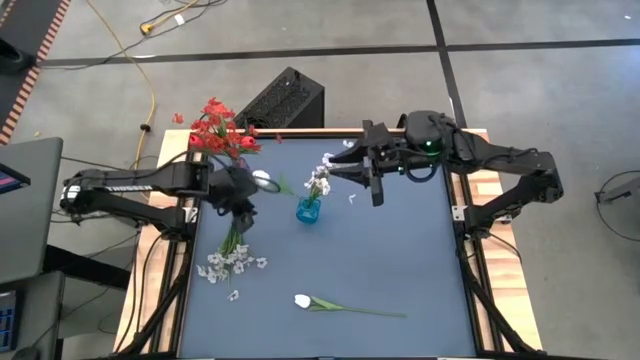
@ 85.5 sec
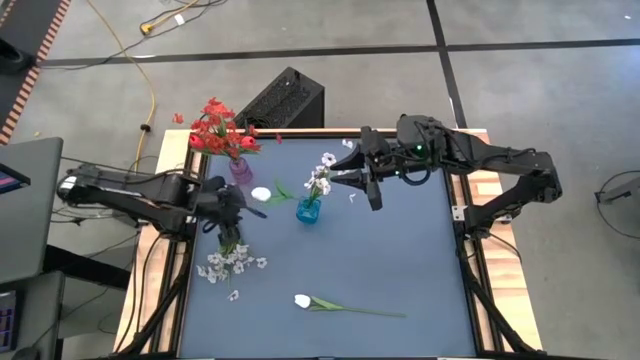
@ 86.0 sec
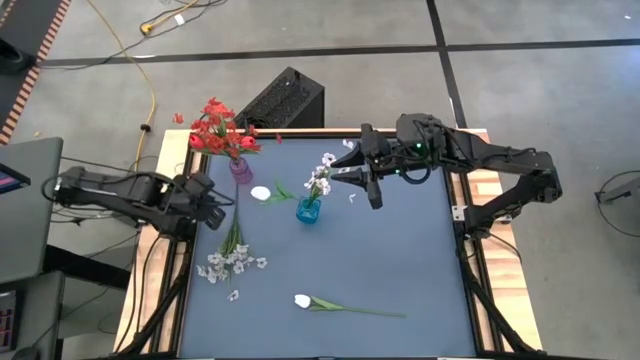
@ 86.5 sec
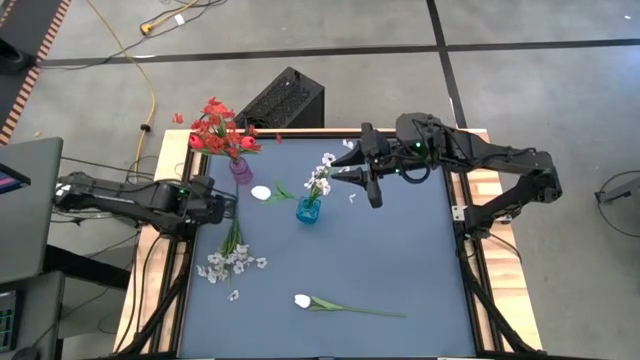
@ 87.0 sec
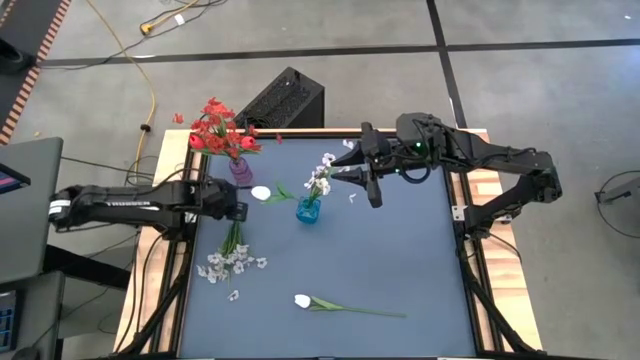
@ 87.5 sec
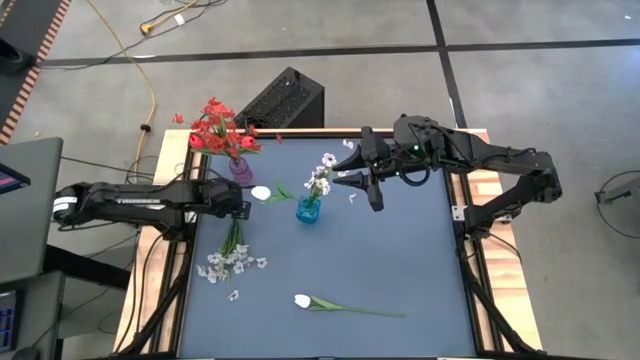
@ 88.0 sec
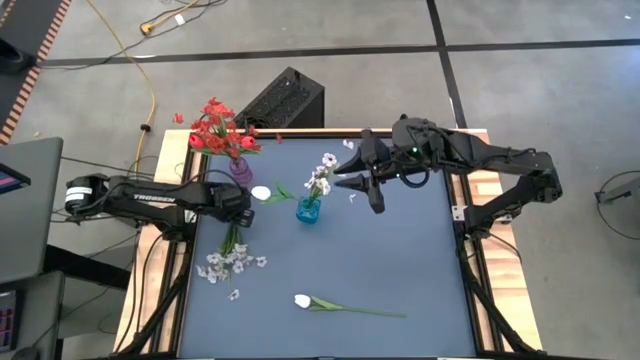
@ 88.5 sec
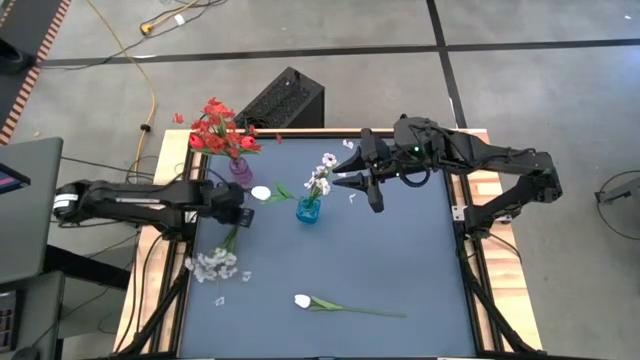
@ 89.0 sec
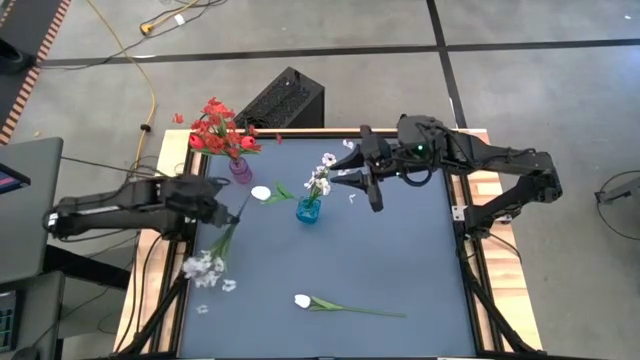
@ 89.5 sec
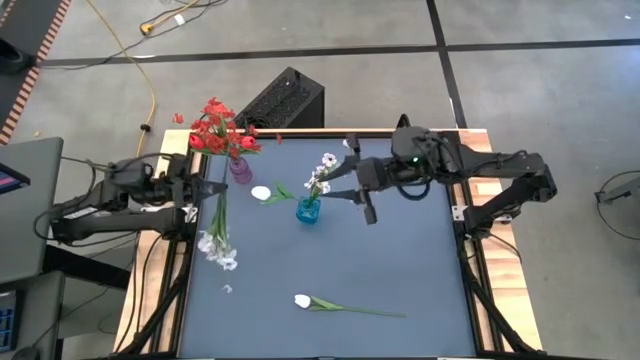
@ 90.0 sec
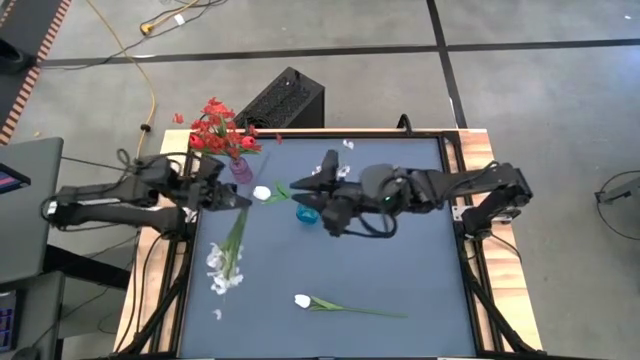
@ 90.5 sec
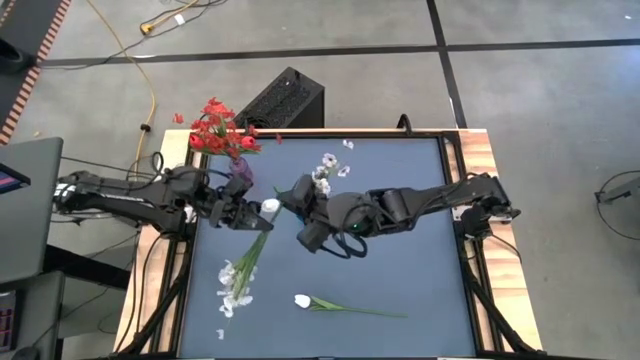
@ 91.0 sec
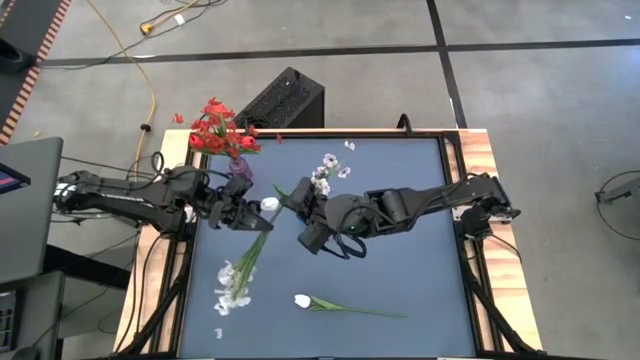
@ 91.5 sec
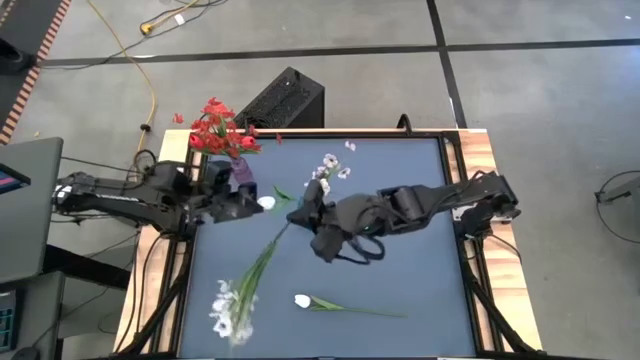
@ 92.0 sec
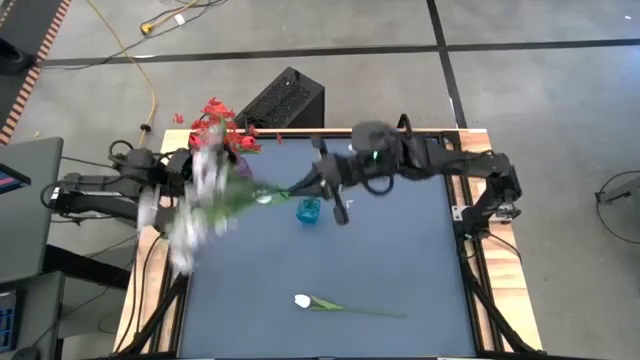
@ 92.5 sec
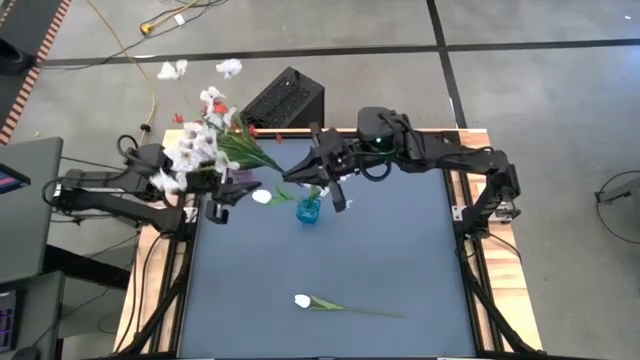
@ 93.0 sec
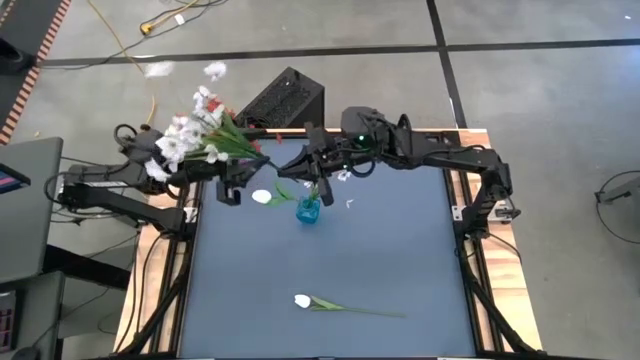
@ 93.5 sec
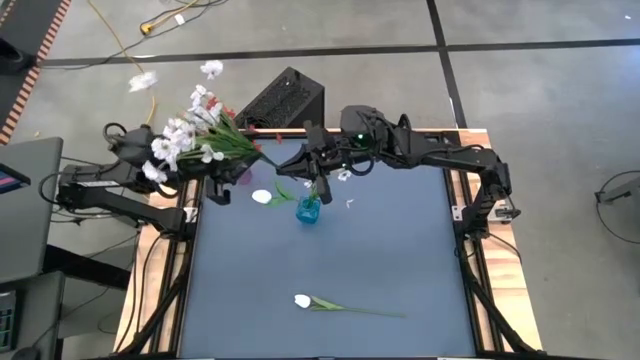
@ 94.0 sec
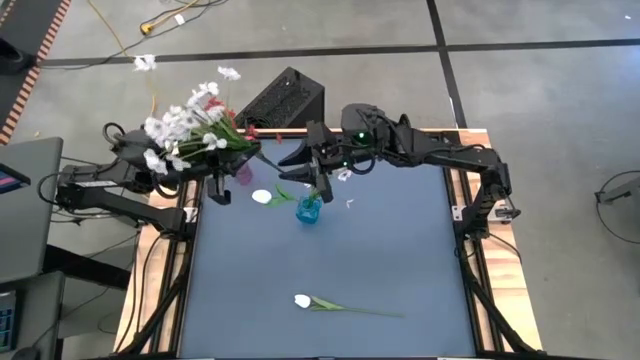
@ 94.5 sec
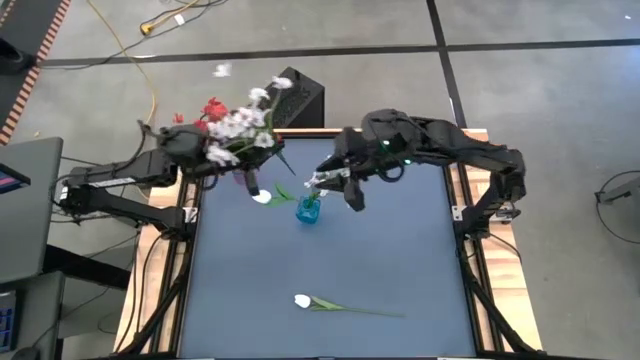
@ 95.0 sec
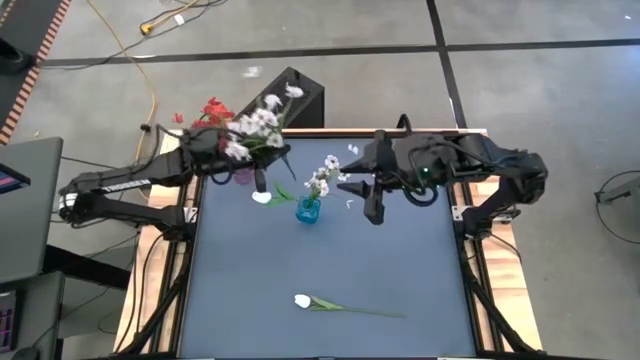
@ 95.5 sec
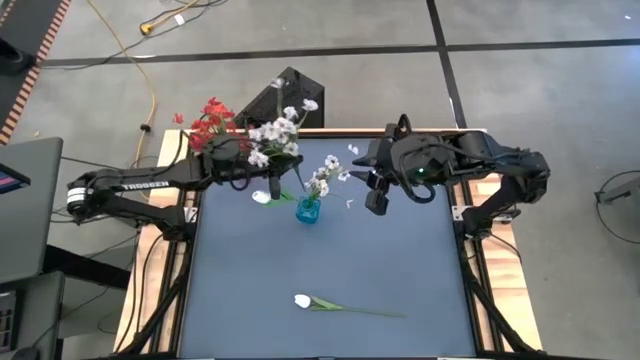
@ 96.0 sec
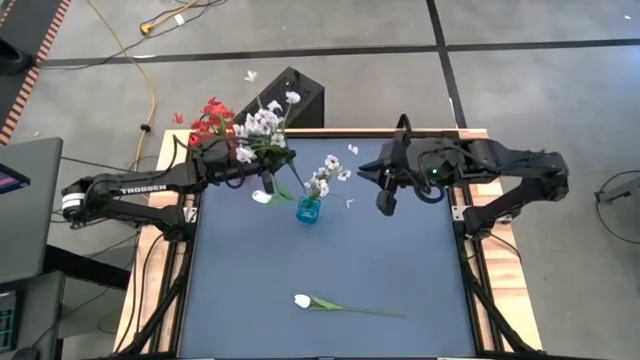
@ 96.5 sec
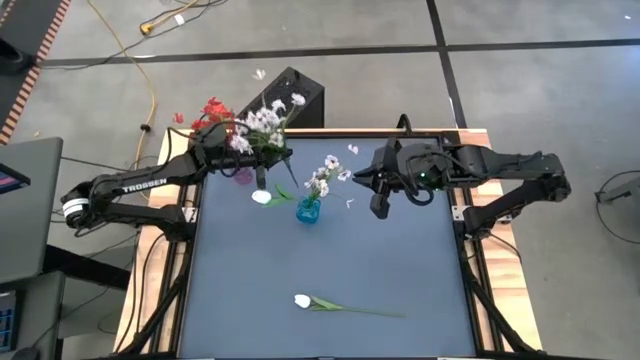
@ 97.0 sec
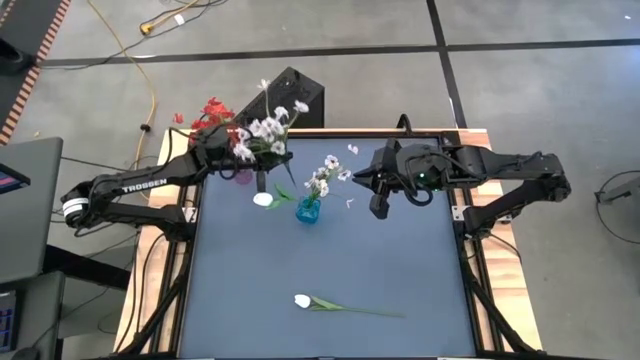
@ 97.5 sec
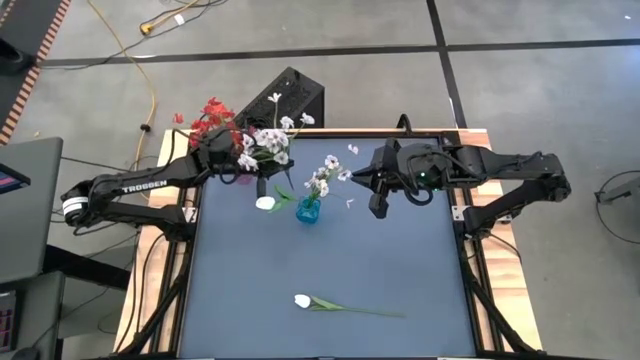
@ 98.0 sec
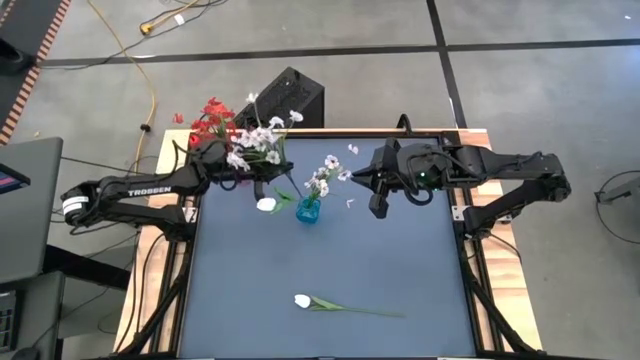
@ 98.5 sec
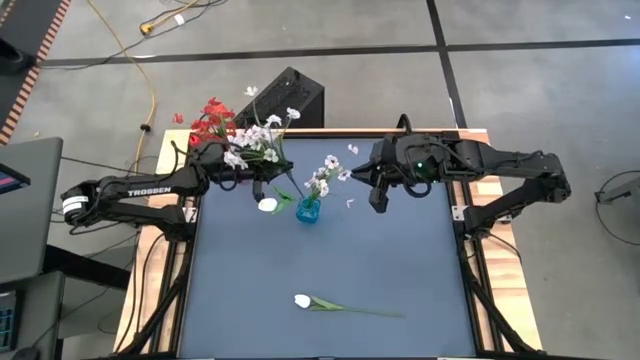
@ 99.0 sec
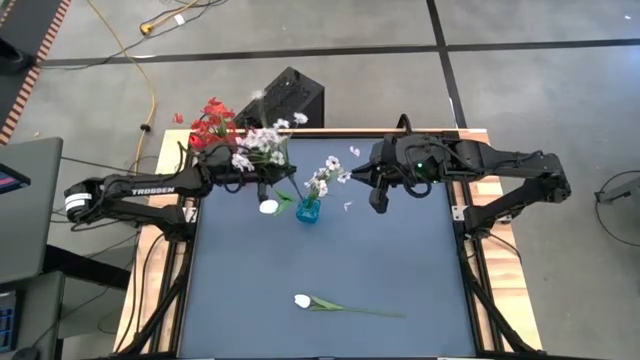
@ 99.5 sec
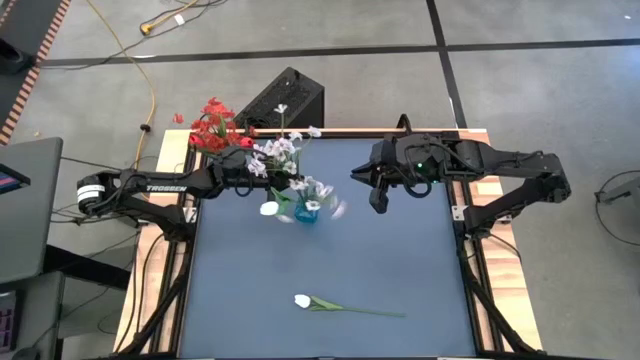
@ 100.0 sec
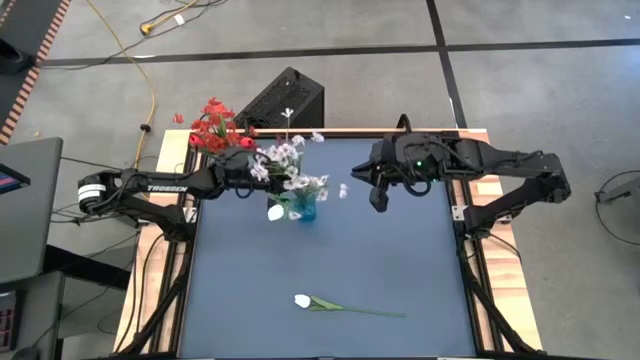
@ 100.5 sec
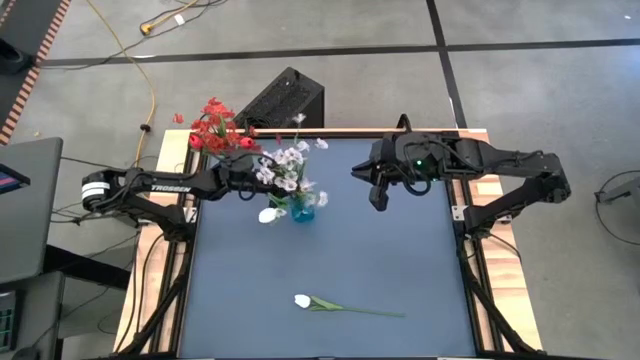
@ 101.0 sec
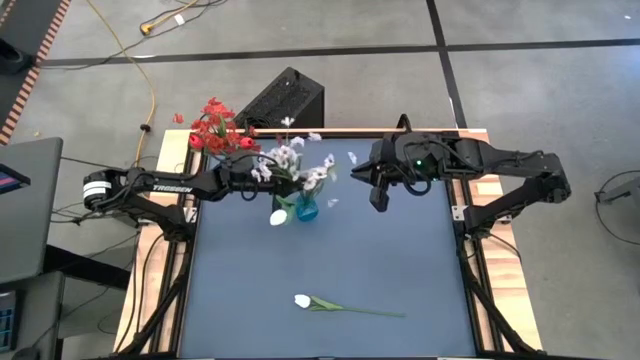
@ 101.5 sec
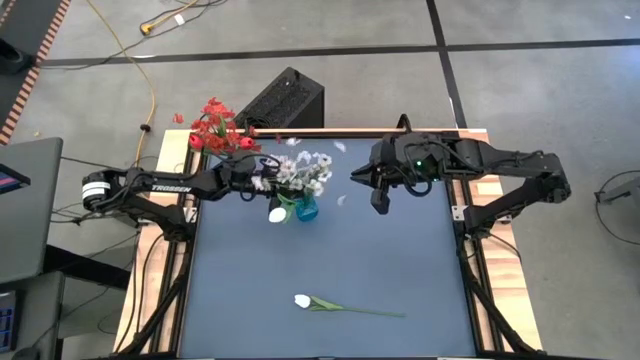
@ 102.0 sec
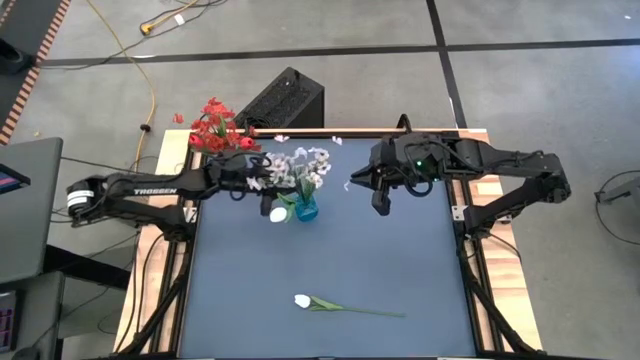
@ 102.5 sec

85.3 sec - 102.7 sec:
Task: Sort flowers into vase by color
Put the white flowers into the blue vase

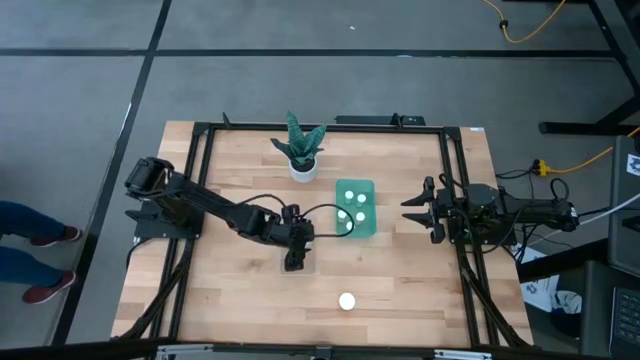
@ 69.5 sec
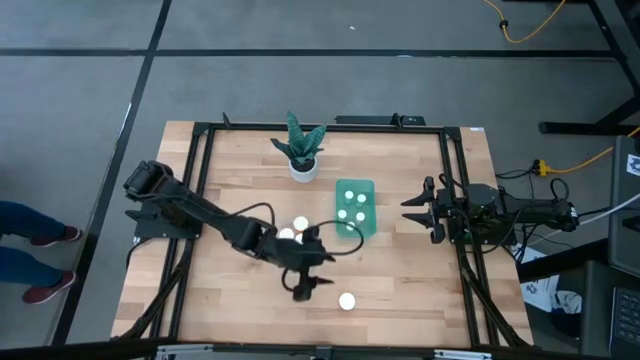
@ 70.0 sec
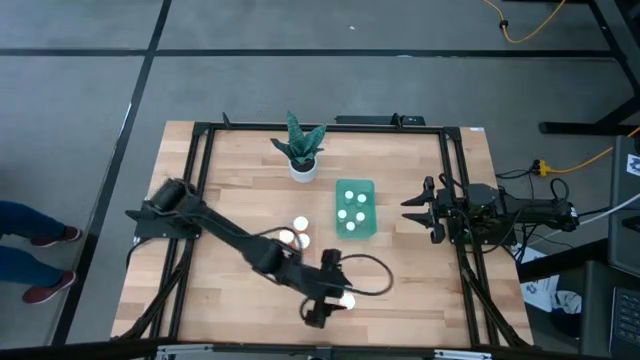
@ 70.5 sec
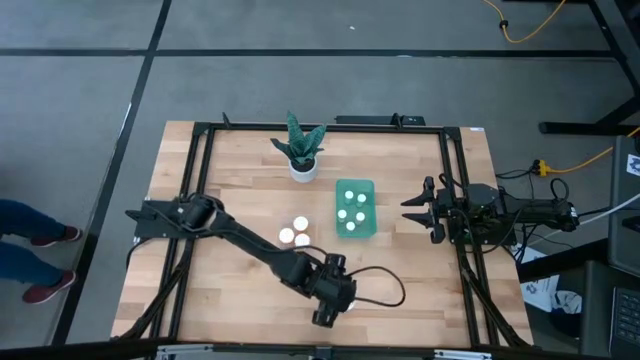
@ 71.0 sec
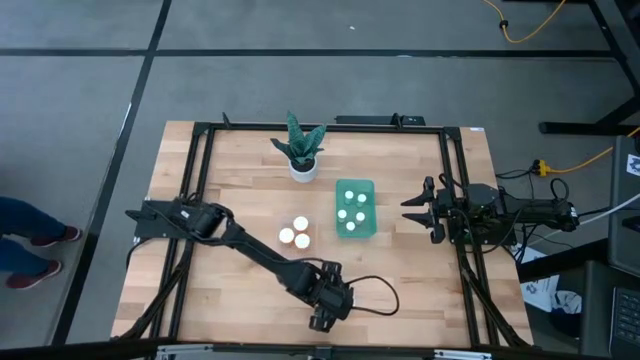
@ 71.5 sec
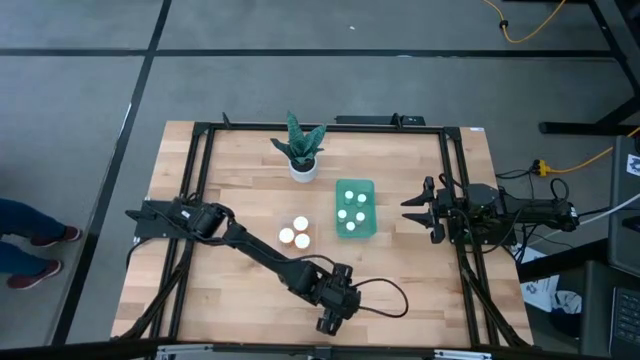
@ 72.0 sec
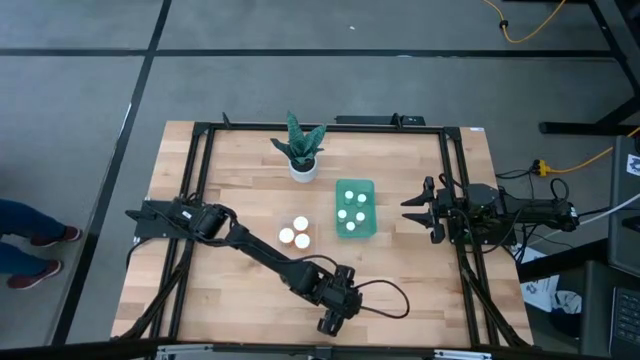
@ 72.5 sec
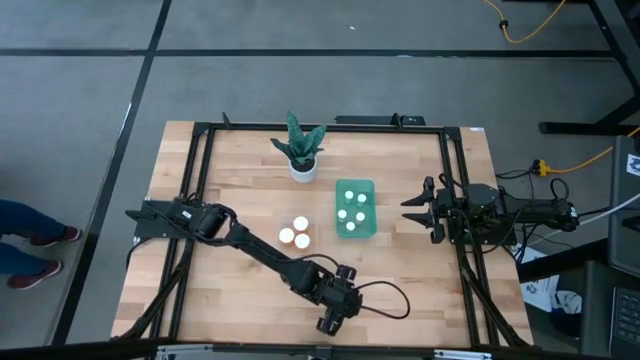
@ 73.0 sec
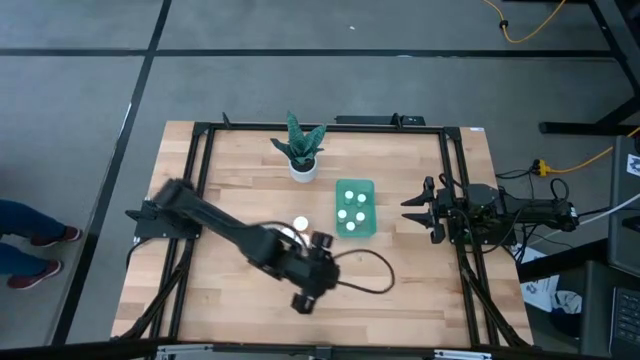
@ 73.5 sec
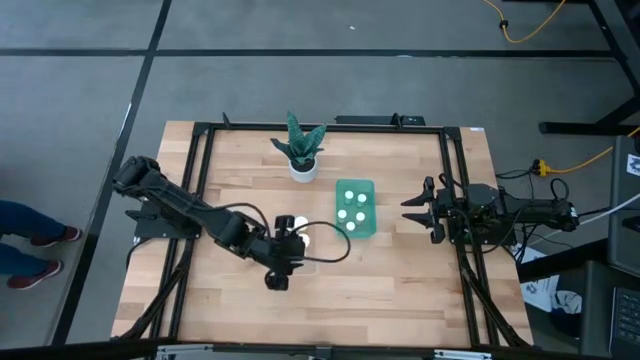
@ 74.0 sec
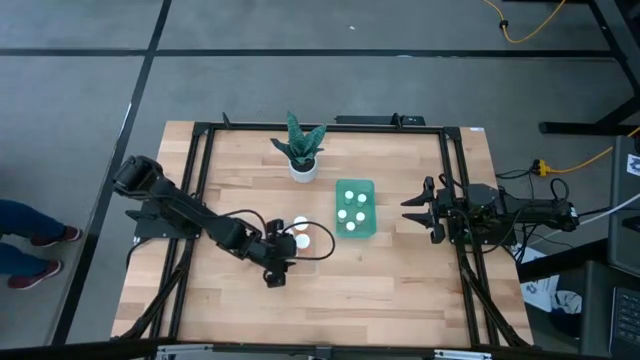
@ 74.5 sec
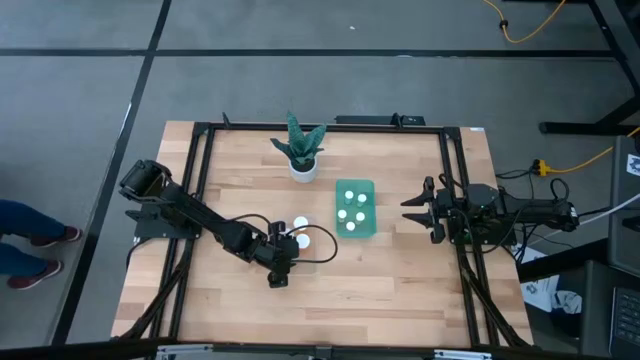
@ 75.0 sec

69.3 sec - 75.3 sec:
Task: Pick and place medicine bottles into bin by pill shape (circle, oval)
Put the large orange pill bottle into the transparent bin
